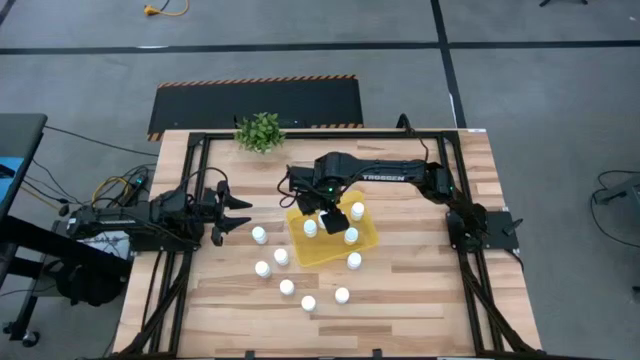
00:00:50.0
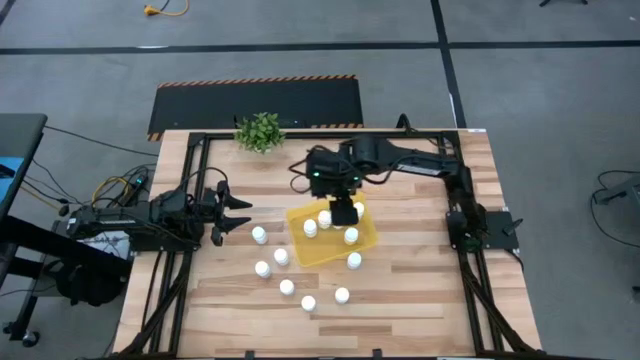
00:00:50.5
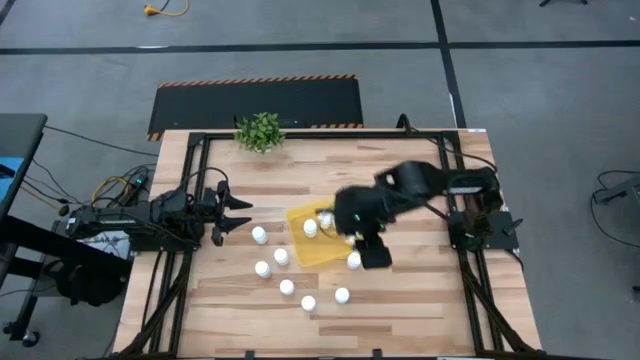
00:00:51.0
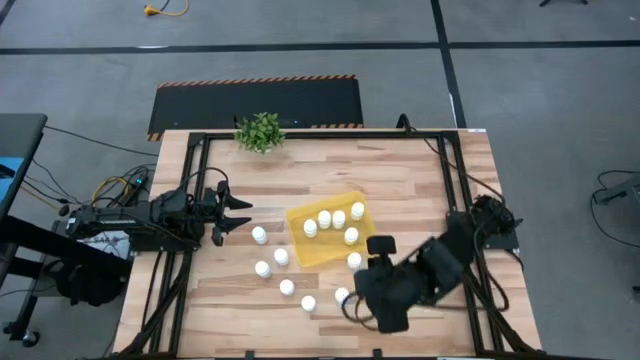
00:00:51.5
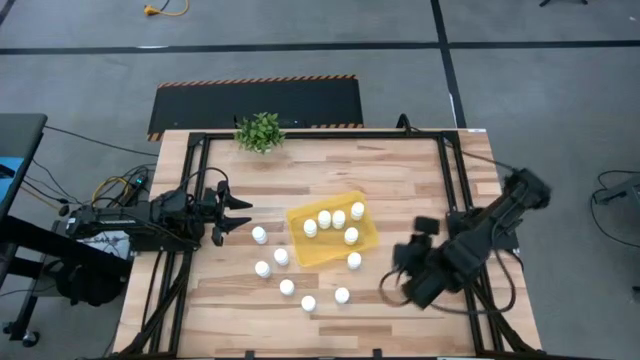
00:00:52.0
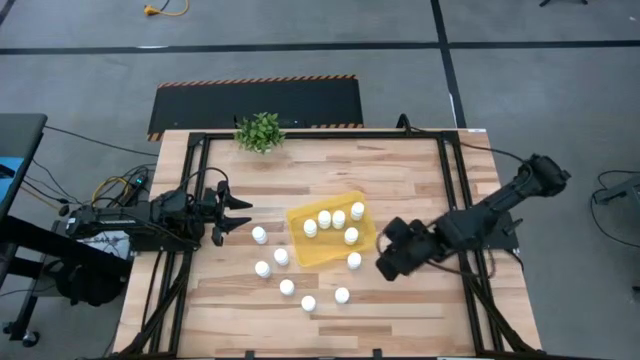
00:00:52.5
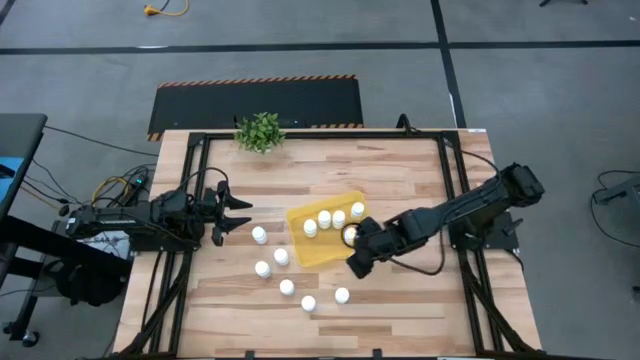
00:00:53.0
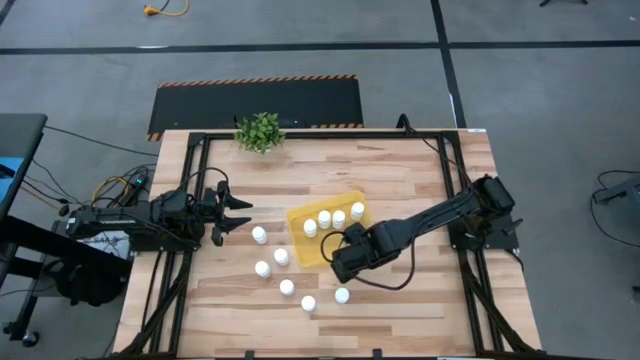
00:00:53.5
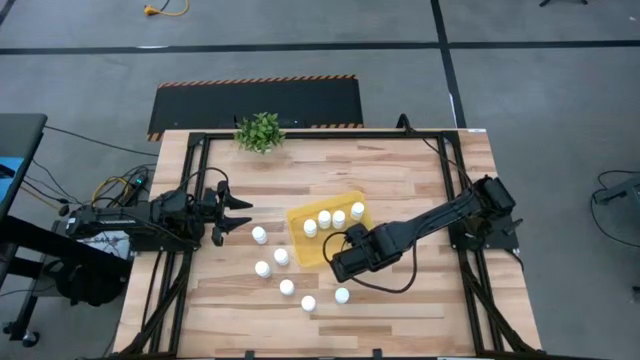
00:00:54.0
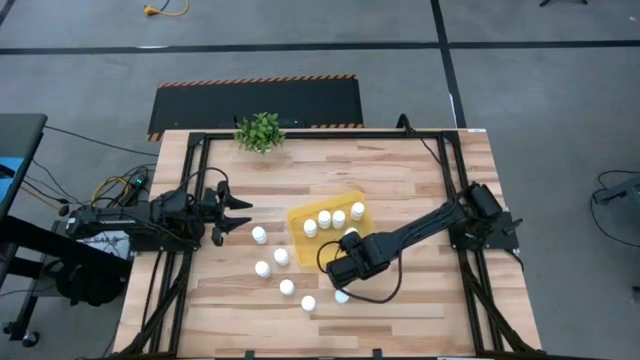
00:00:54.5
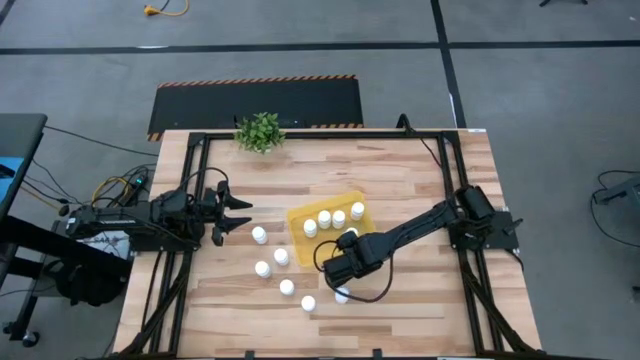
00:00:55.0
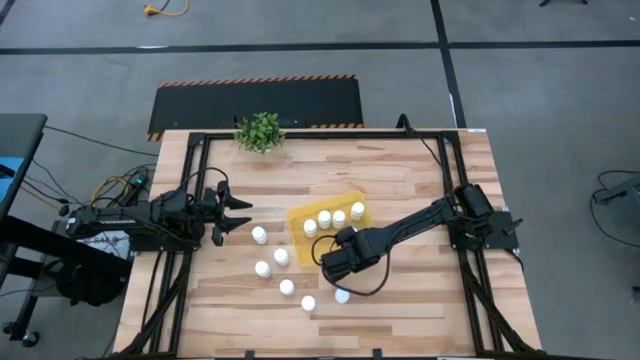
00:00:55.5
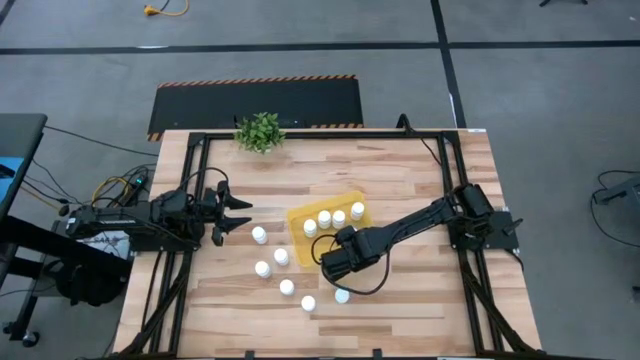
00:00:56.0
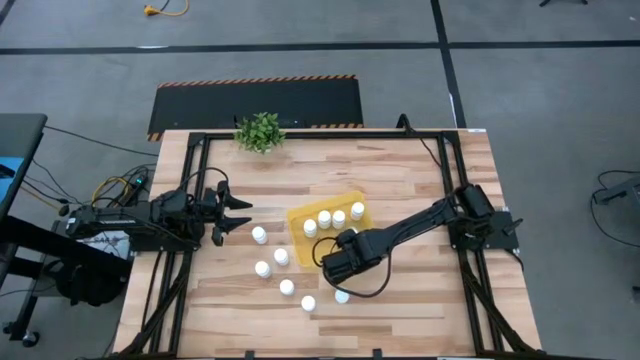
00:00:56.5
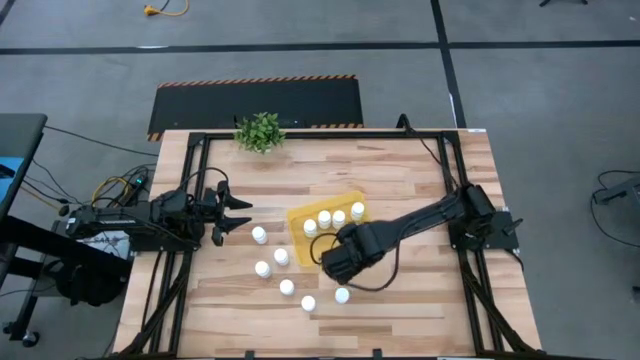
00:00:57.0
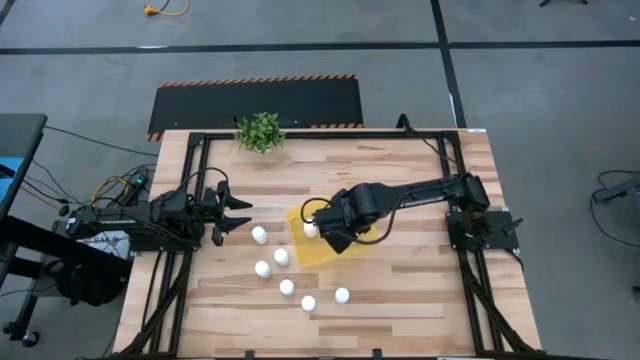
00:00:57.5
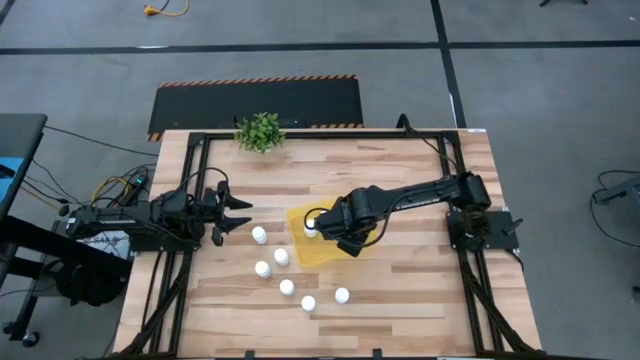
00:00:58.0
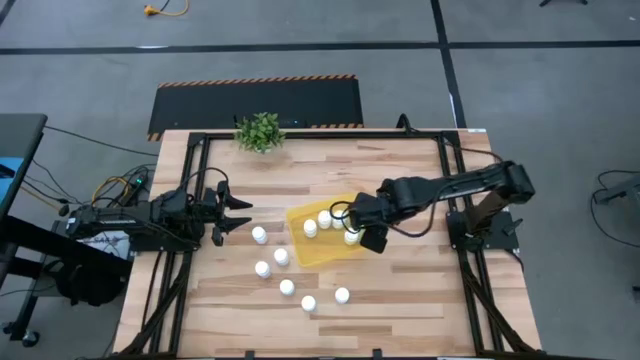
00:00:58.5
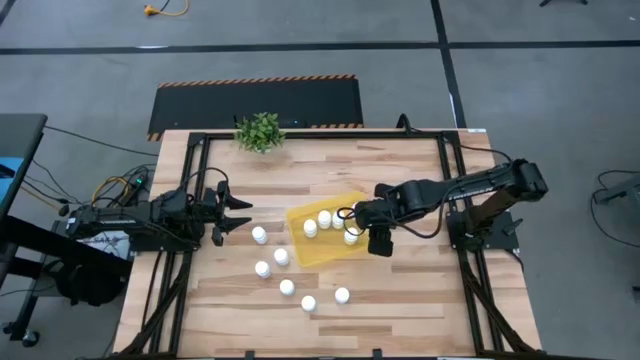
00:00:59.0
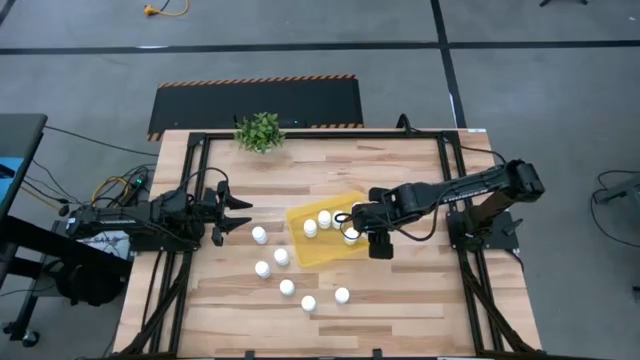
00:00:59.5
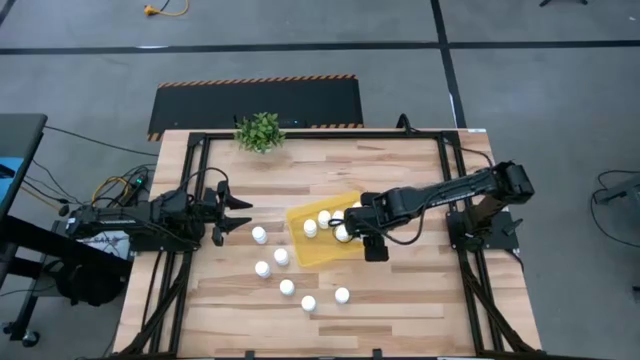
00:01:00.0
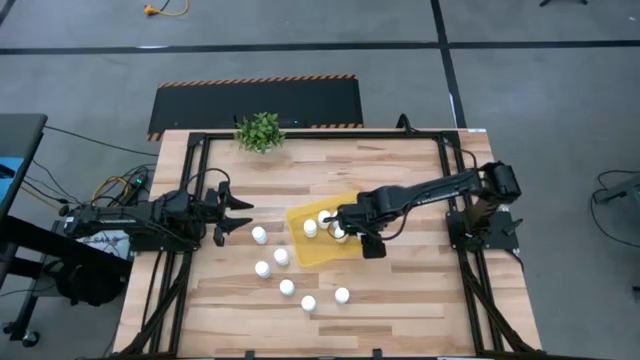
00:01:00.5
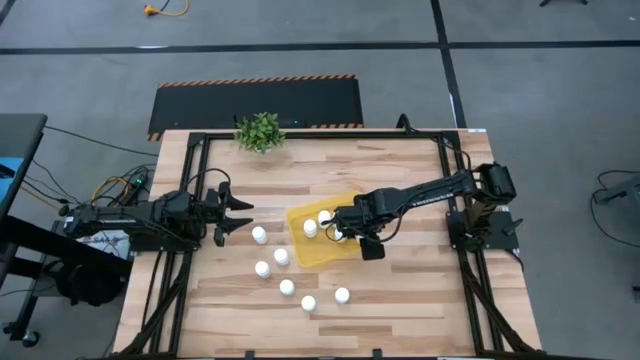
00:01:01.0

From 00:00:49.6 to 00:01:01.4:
Task: Pick and place pill bottles into a basket
Put the white pill bottle into the yellow bin

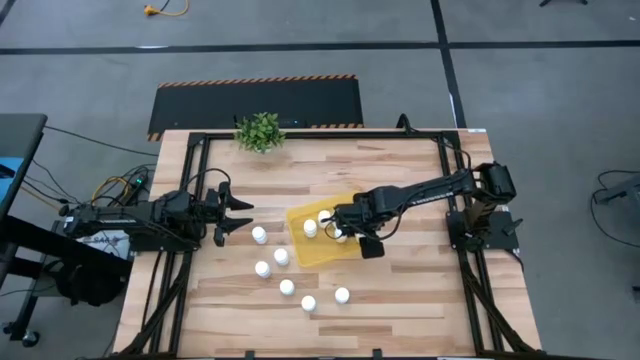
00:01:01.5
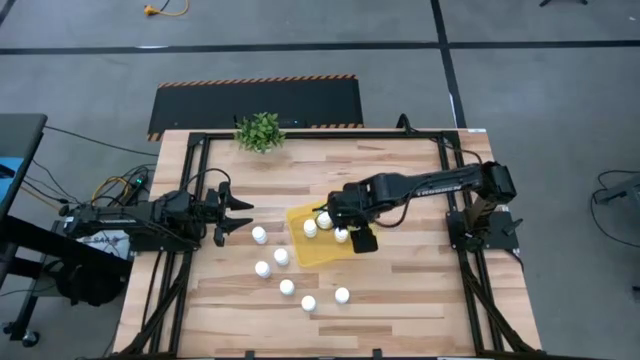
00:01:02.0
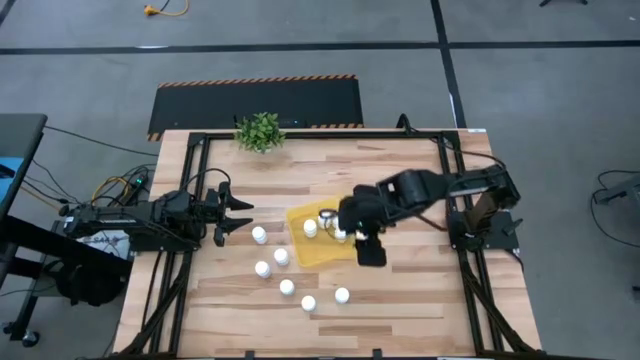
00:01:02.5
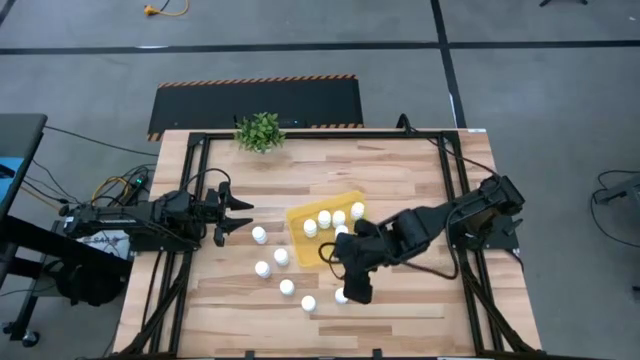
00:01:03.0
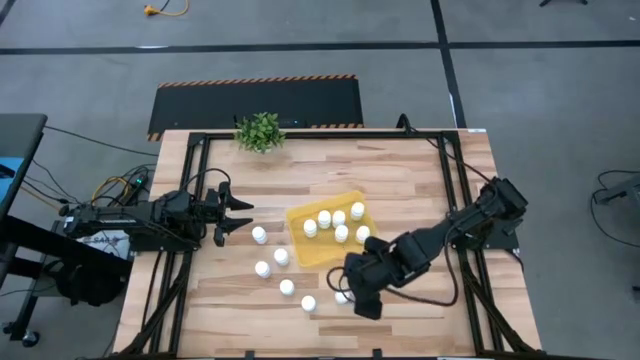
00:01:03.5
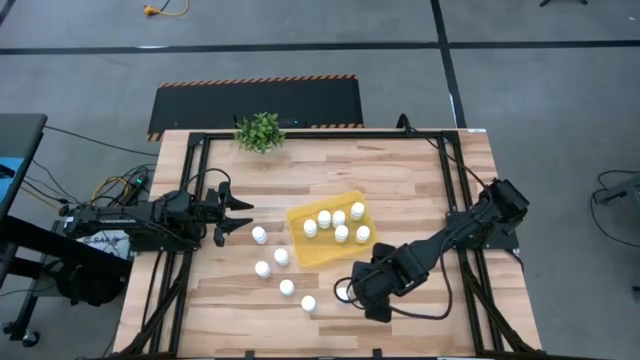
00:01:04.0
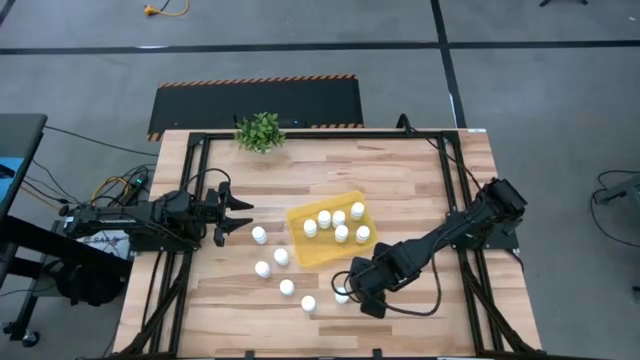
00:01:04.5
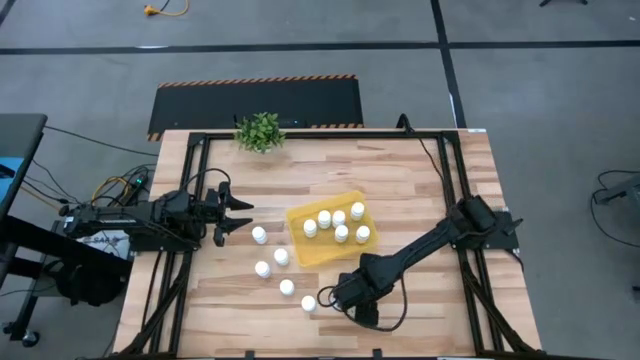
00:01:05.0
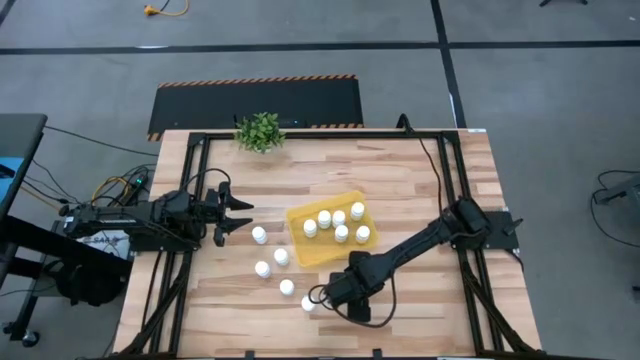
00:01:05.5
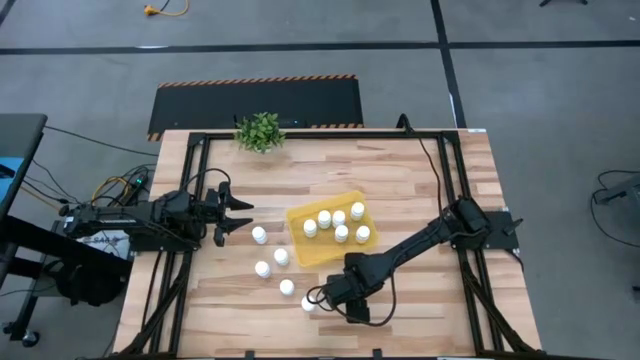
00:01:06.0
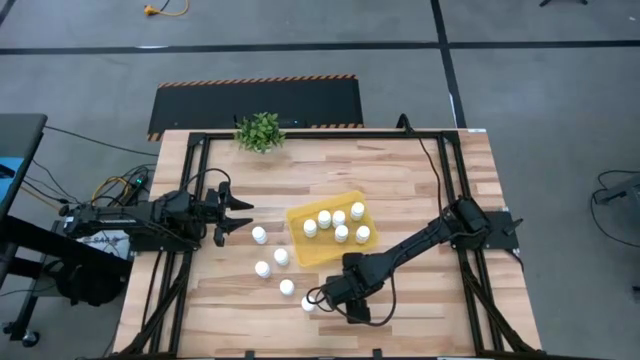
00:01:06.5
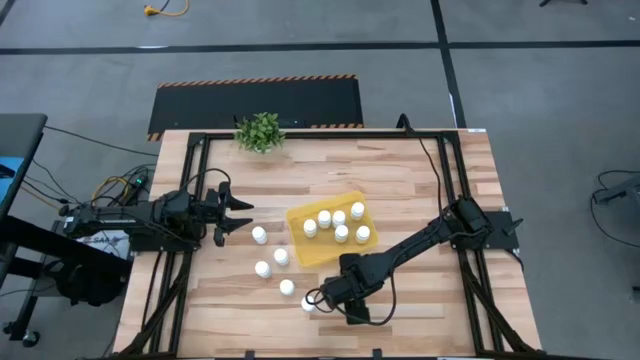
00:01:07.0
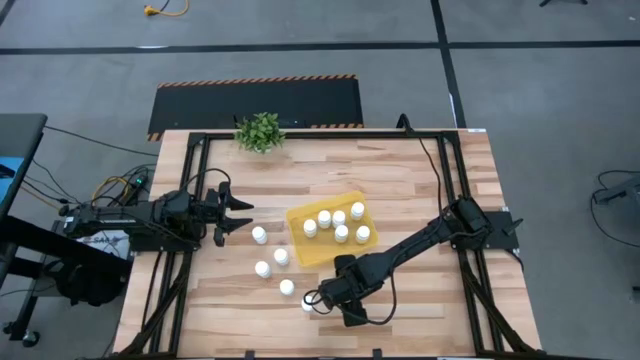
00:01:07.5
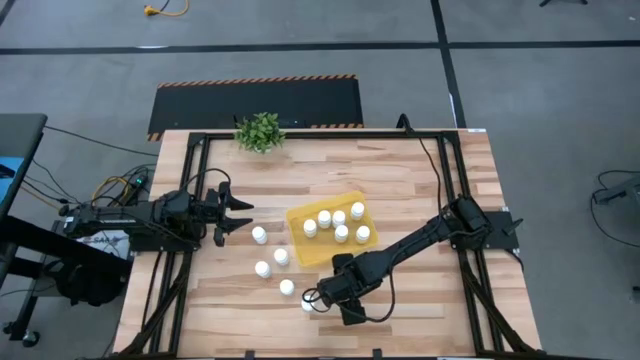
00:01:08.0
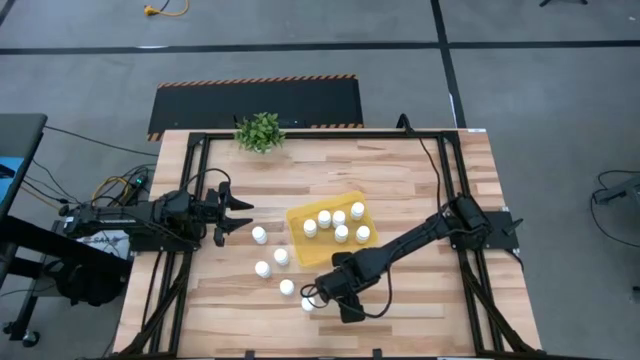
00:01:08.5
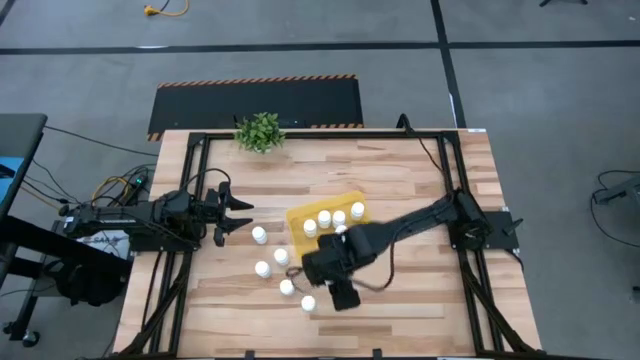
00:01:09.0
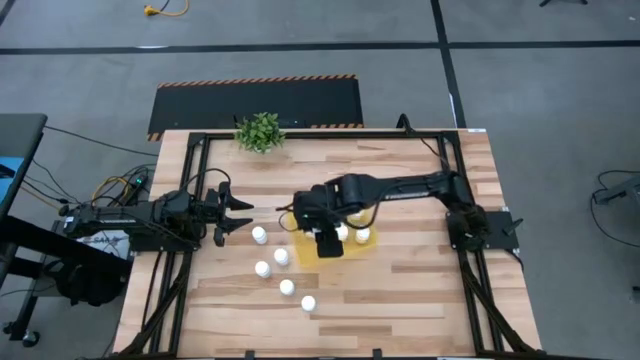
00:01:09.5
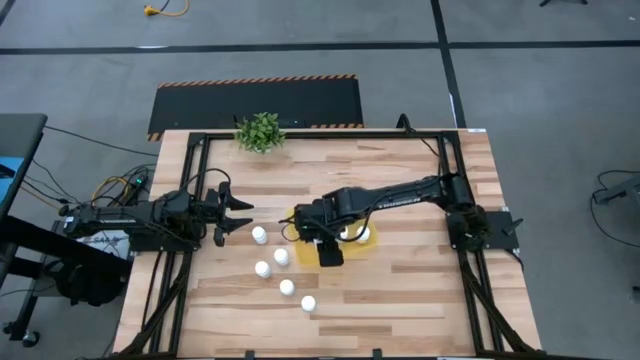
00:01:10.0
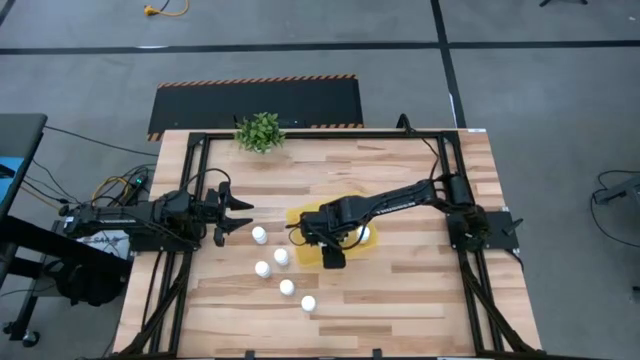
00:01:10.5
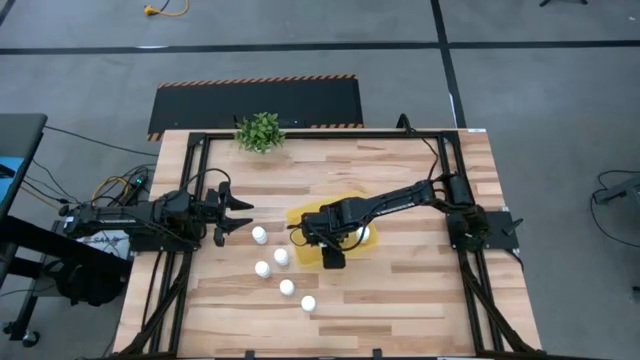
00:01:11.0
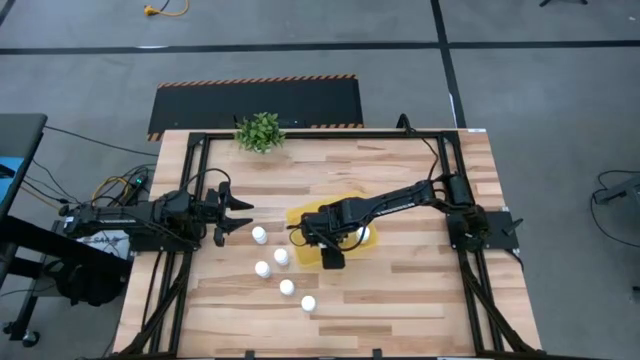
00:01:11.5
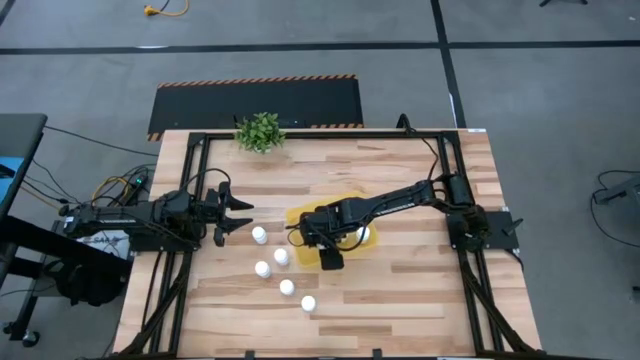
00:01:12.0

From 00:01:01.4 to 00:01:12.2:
Put the white pill bottle into the yellow bin
